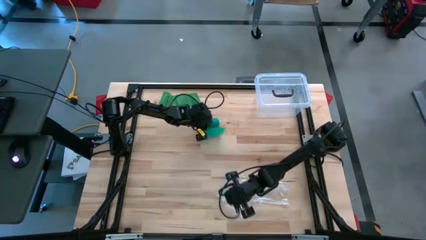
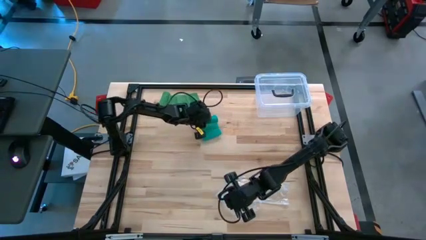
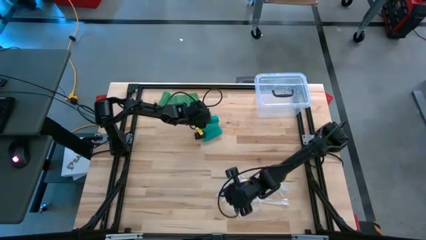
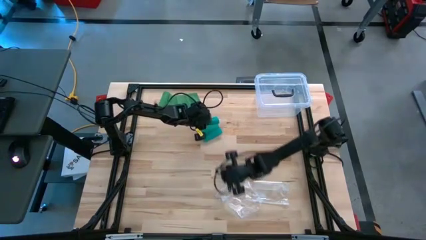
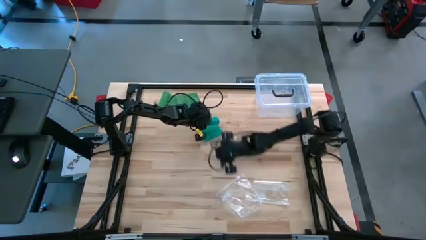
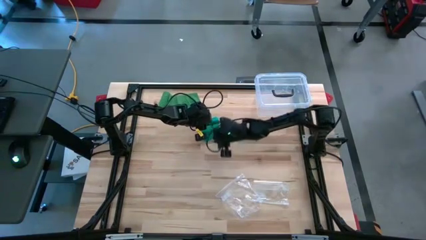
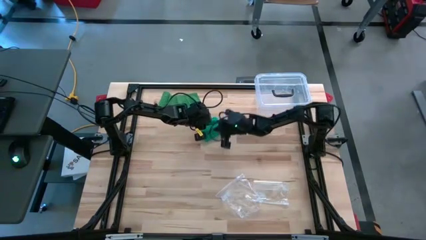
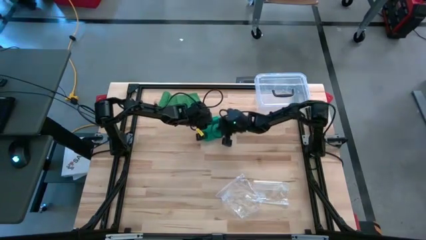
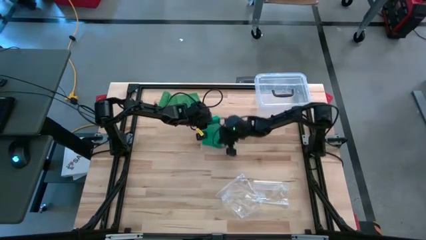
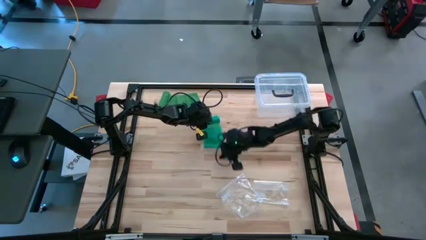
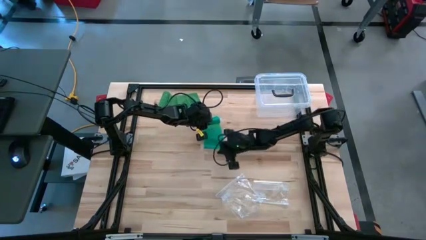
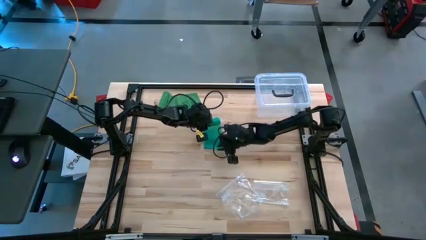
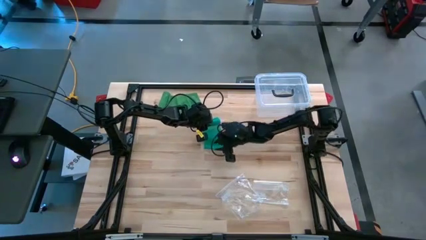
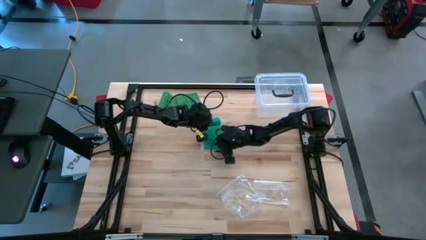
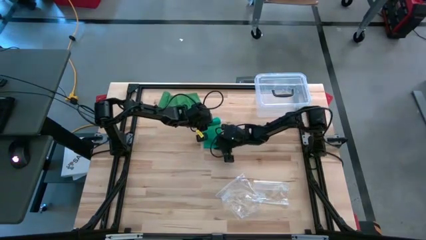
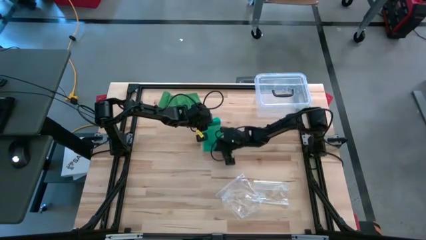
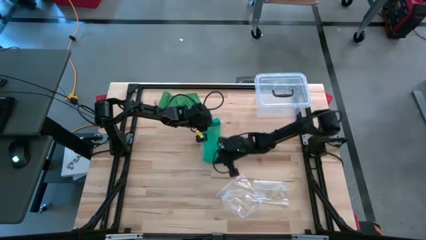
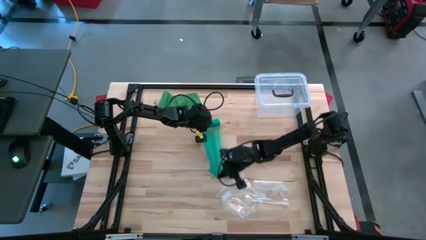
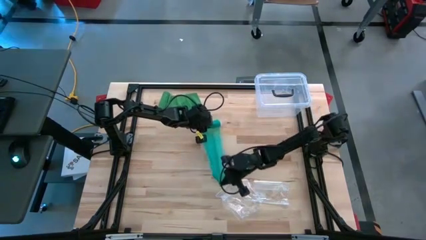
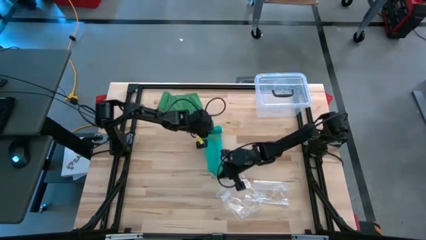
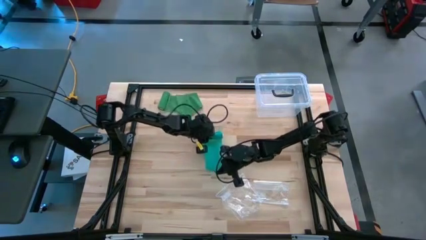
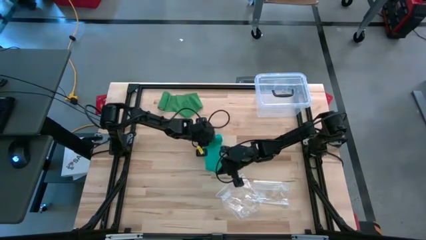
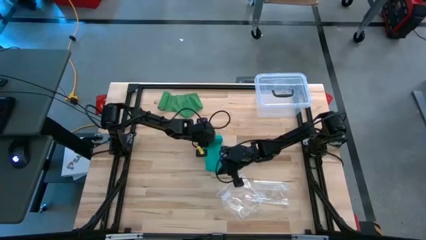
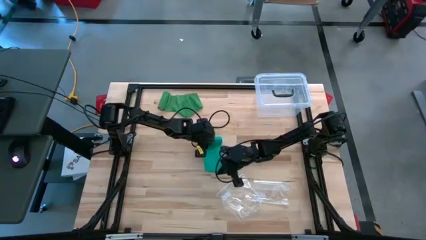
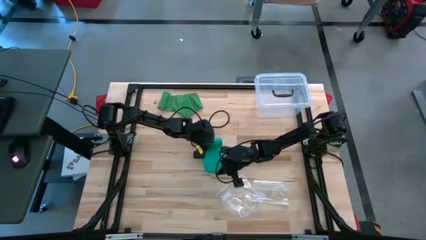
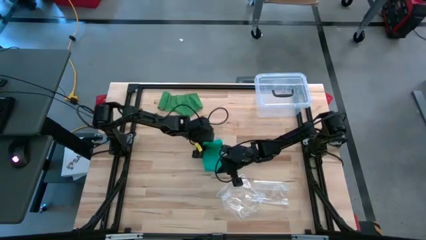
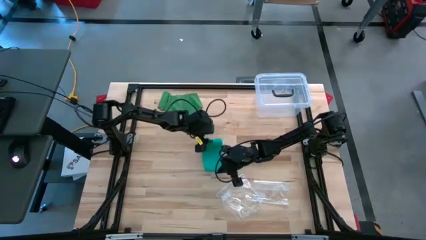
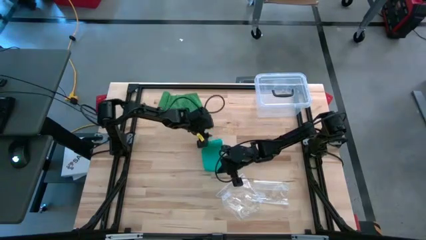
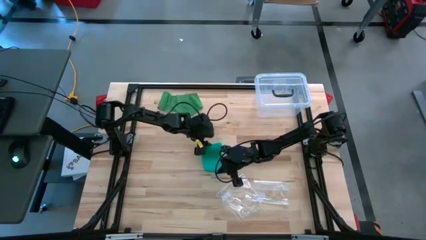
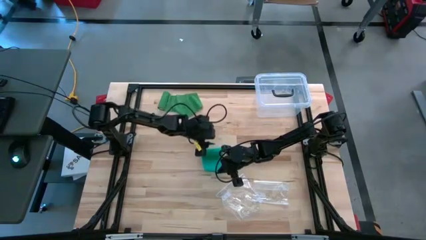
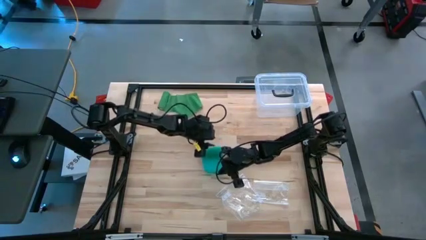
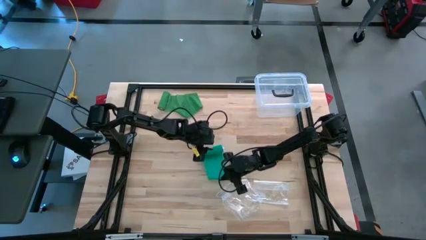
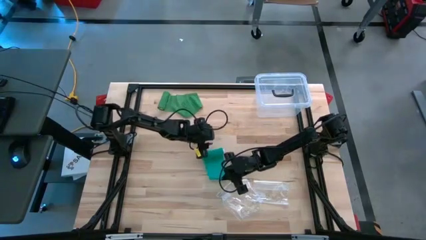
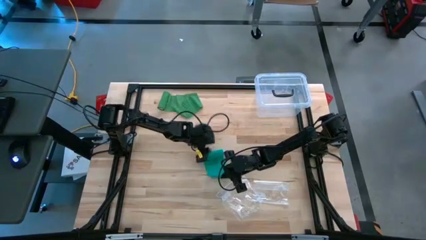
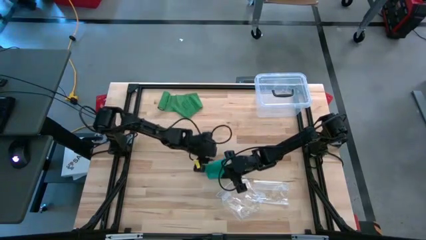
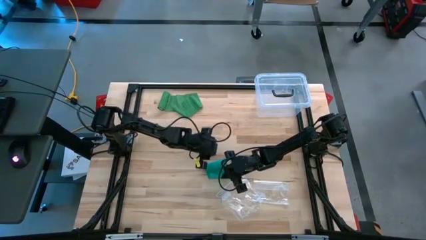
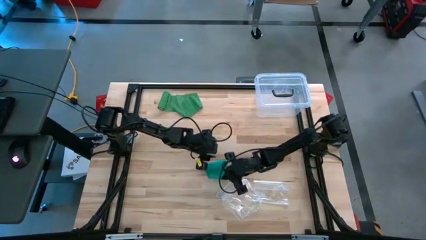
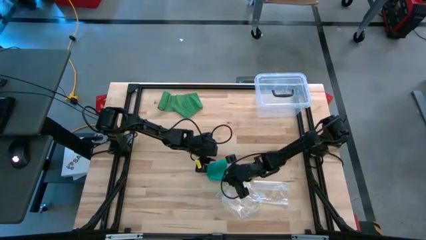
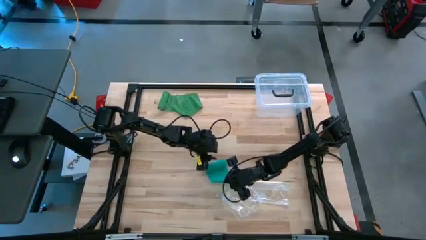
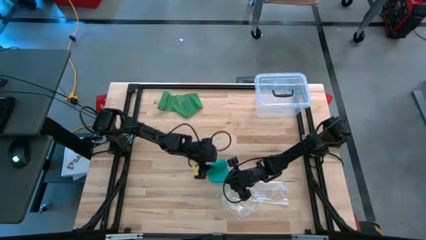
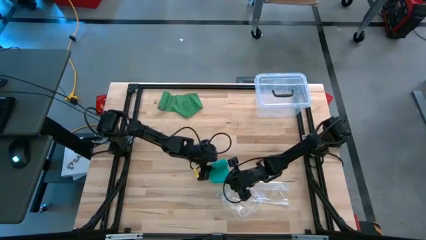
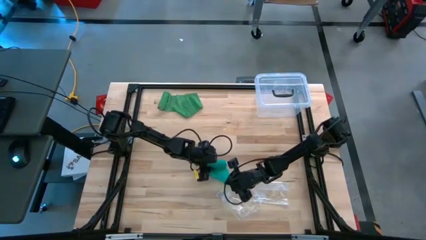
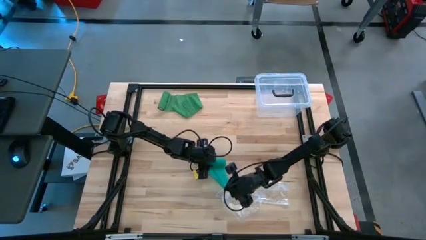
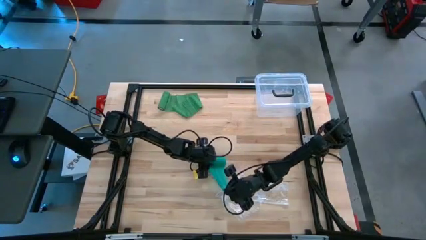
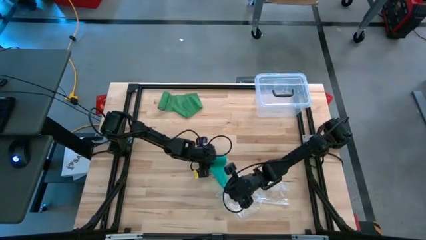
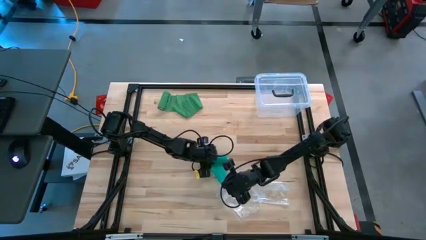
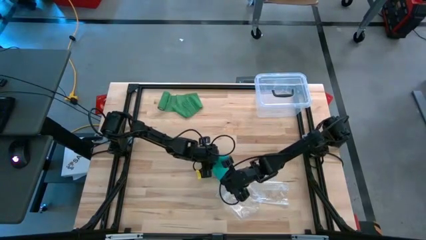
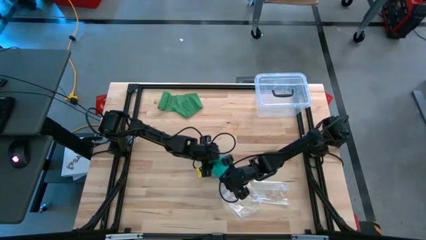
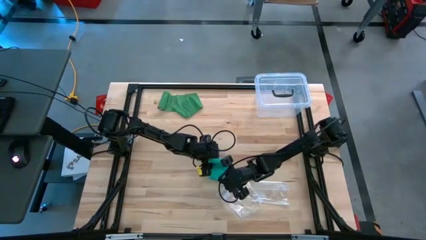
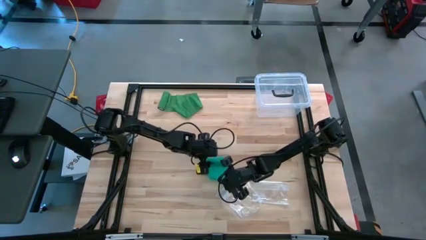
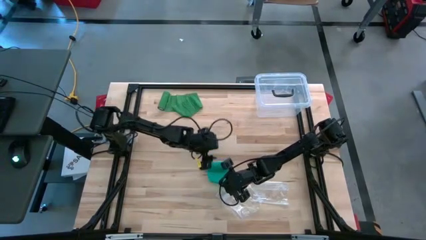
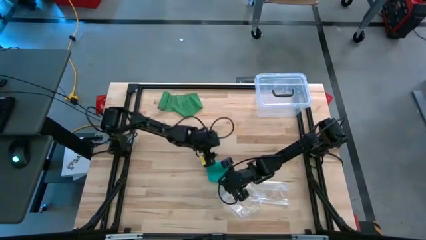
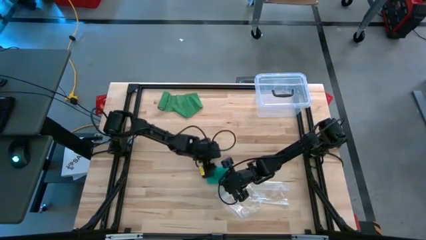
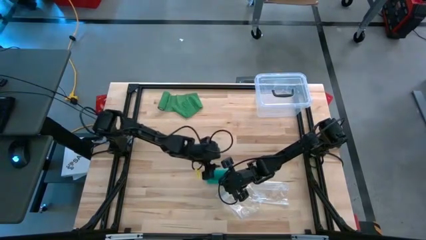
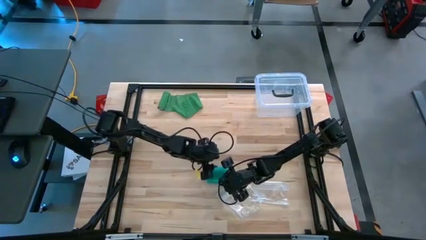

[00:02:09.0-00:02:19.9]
Task: Roll bandage
Roll the blue bandage

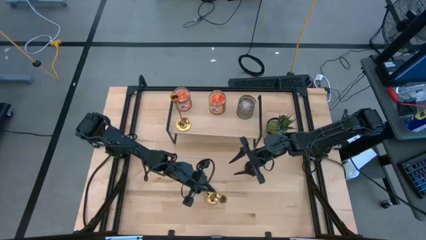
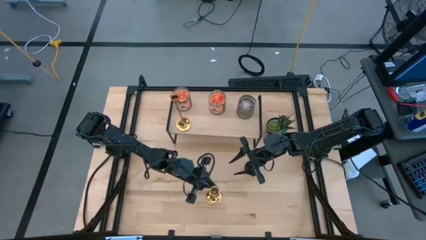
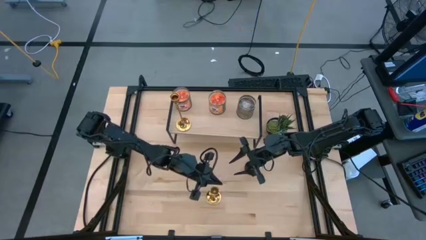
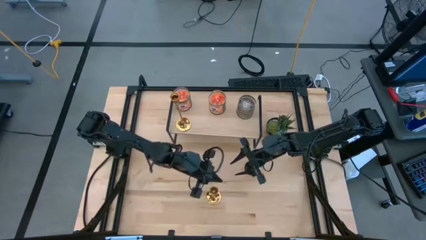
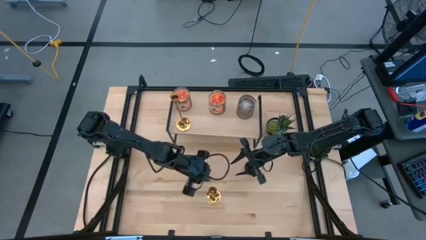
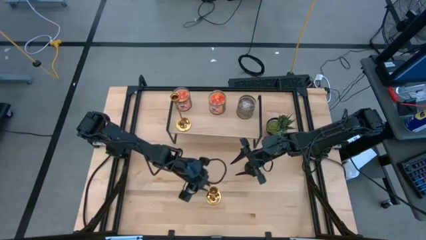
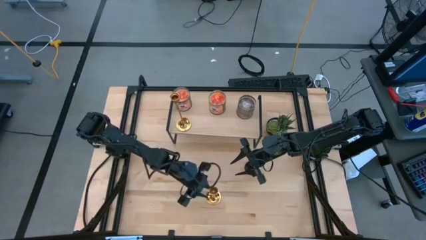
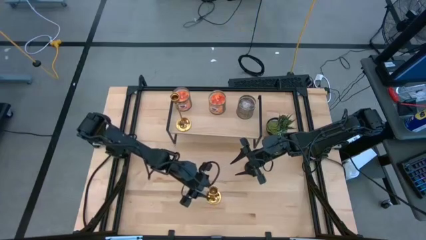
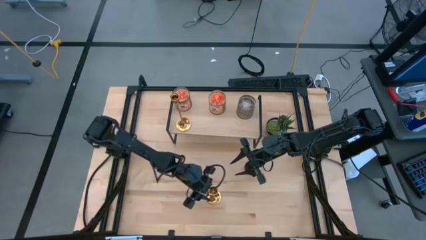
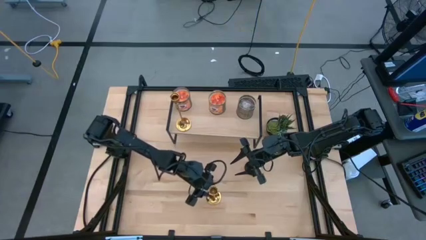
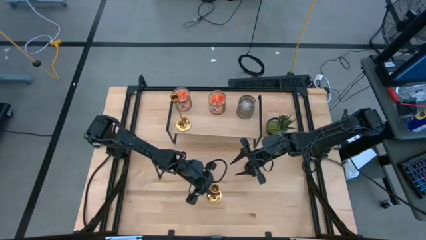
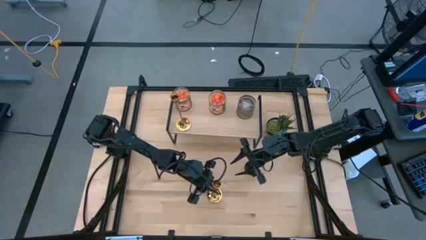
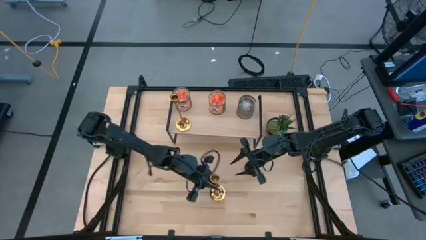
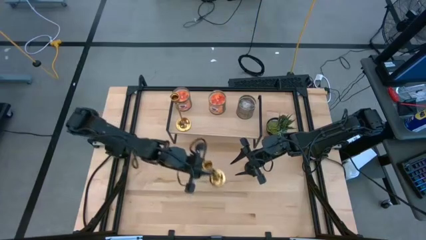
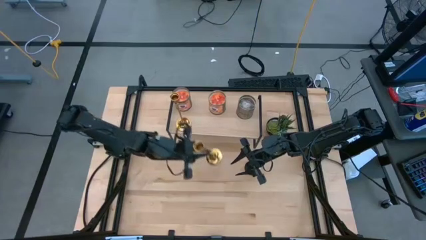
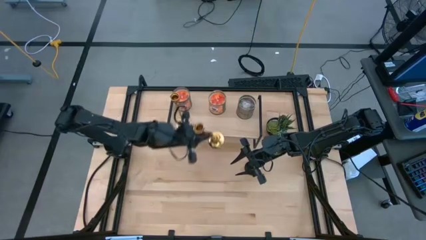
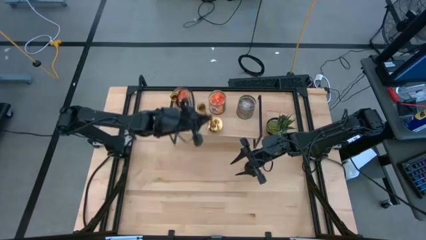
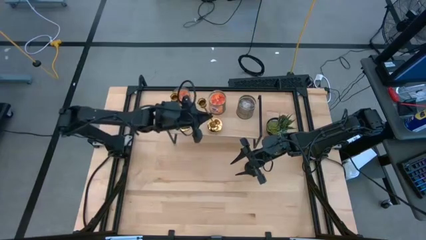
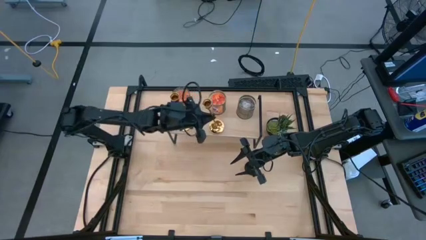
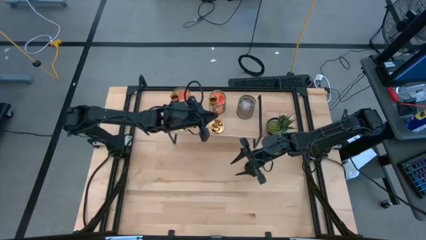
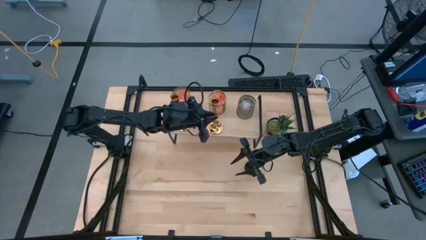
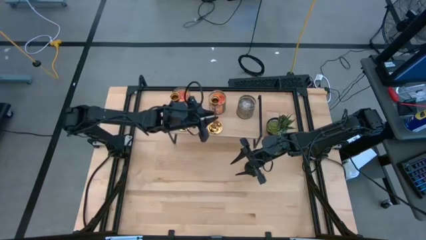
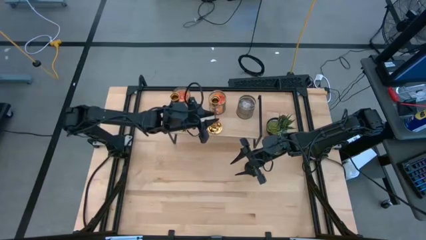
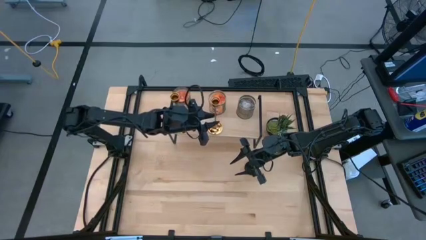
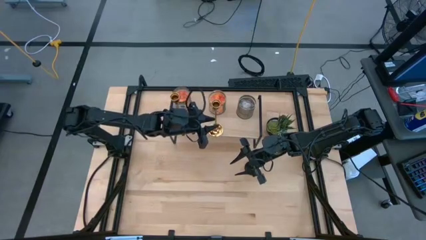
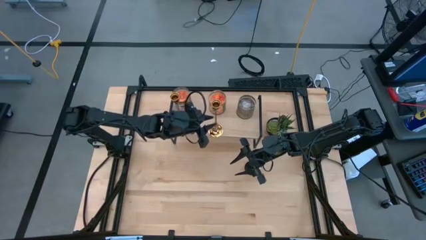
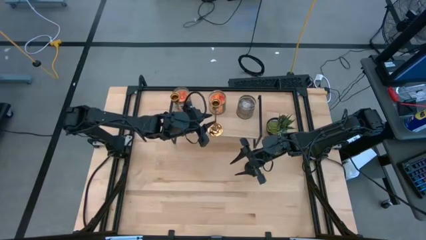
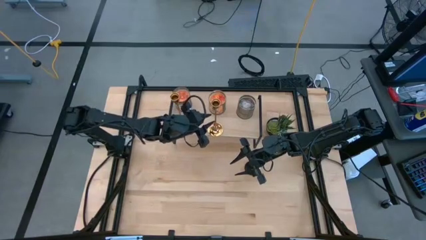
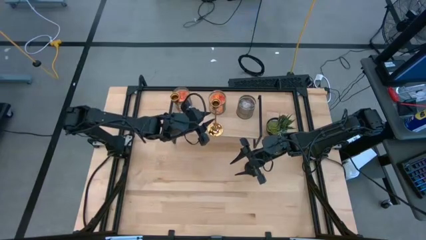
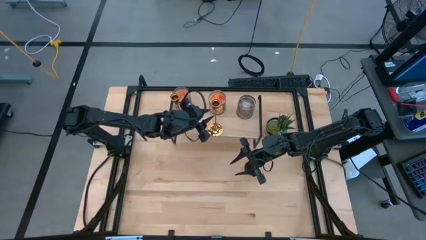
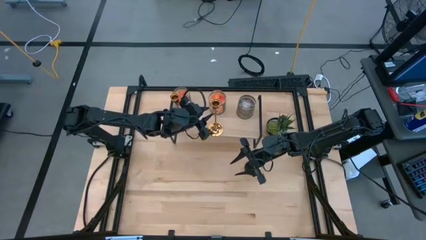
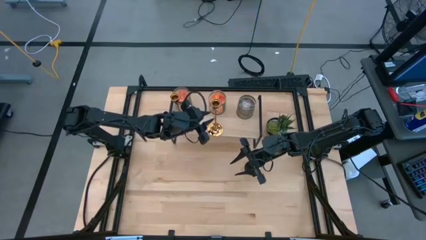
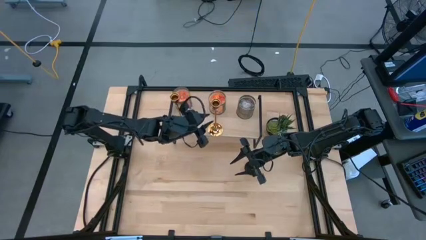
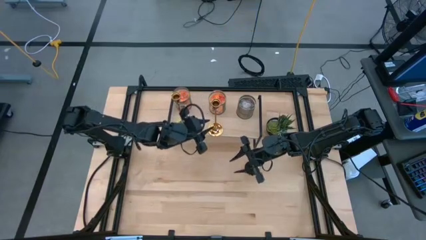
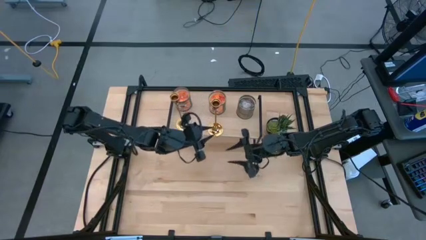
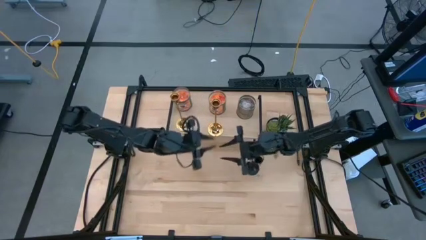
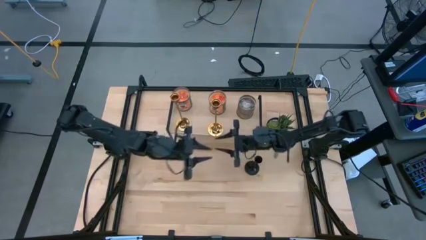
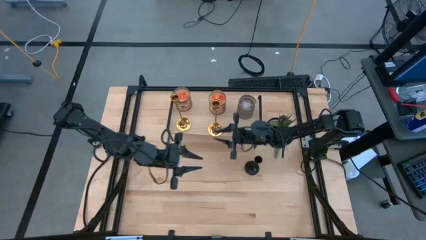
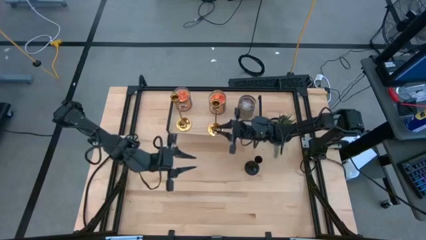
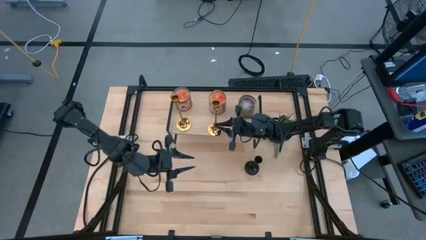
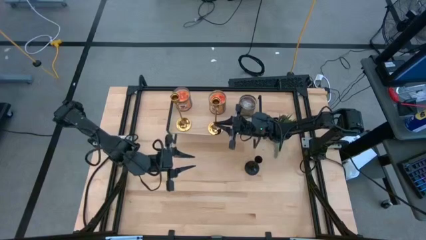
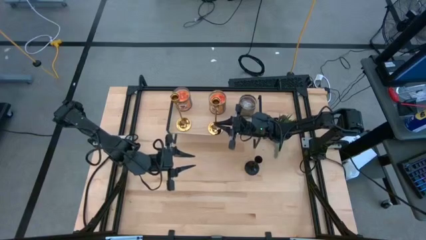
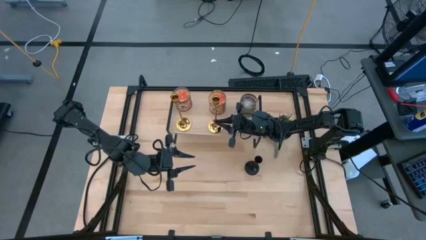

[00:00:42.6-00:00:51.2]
Task: Pick & Place candle stick holders
Put the gold candle holder on the shelf
